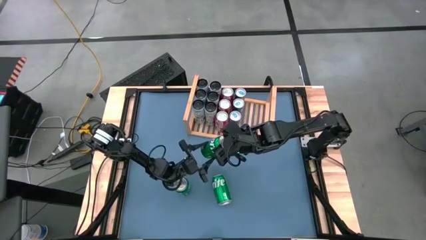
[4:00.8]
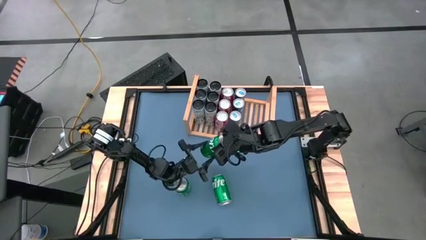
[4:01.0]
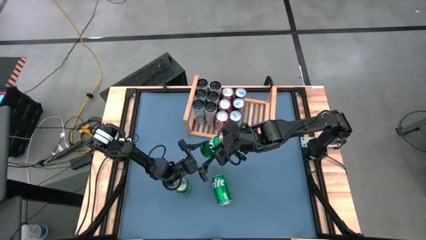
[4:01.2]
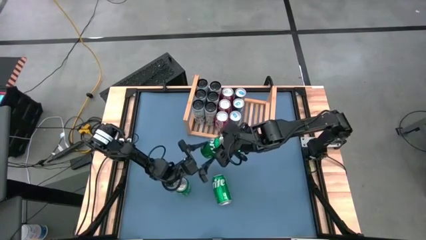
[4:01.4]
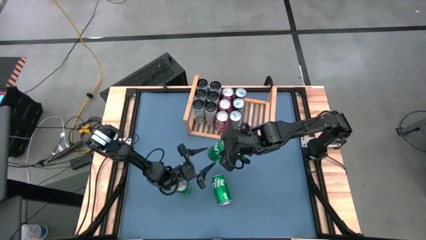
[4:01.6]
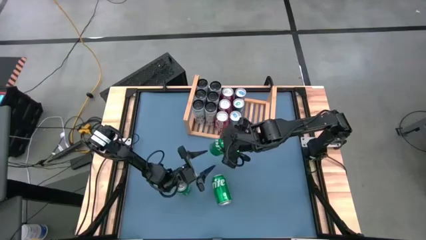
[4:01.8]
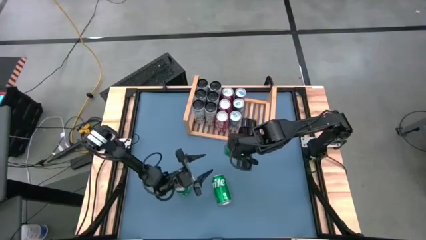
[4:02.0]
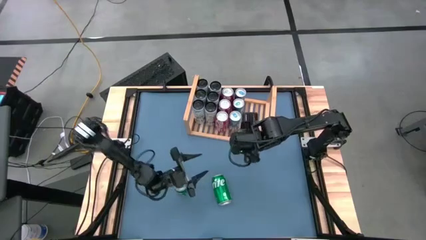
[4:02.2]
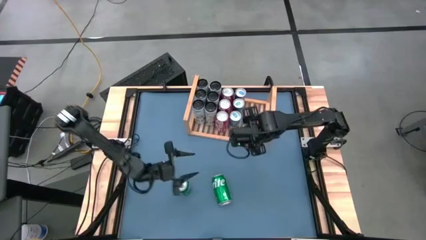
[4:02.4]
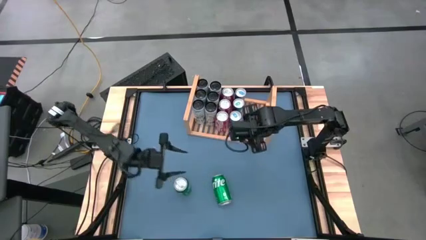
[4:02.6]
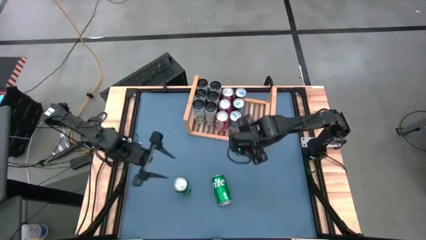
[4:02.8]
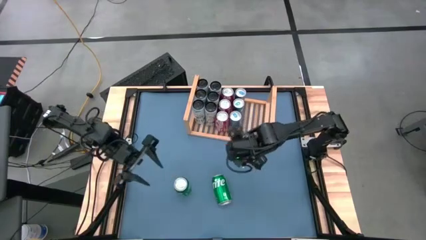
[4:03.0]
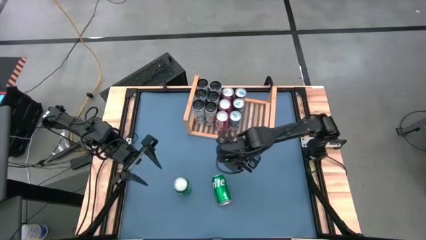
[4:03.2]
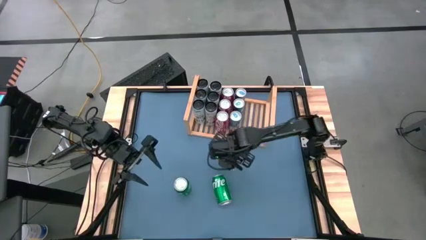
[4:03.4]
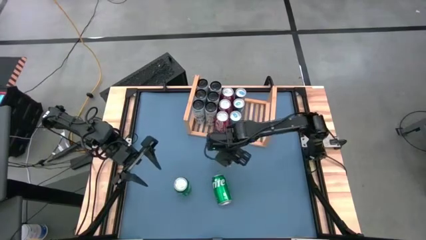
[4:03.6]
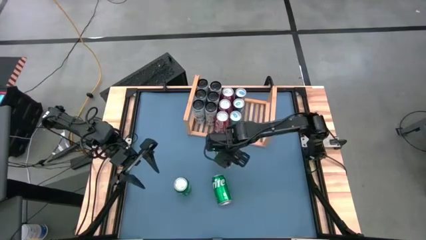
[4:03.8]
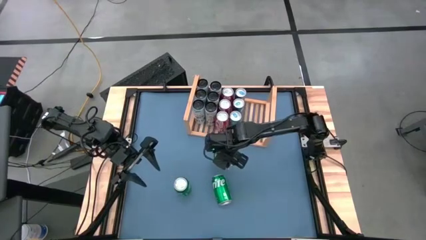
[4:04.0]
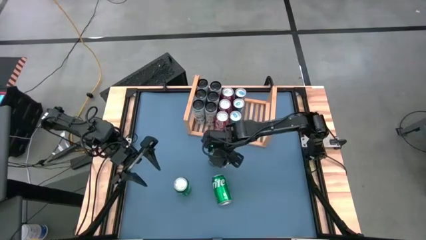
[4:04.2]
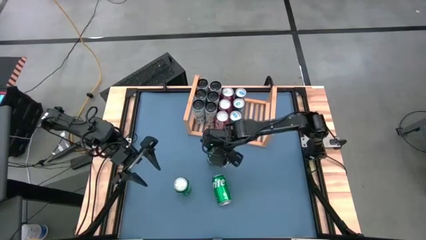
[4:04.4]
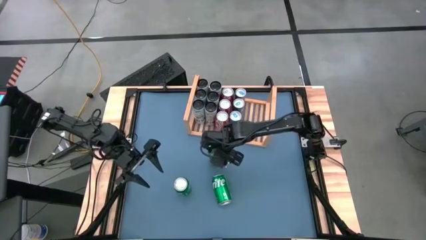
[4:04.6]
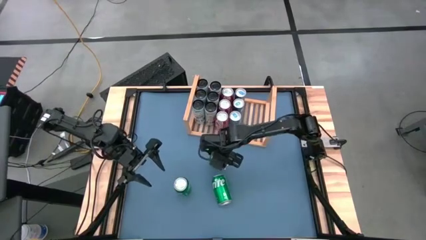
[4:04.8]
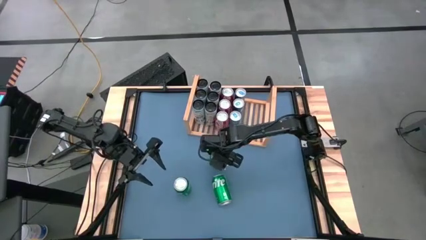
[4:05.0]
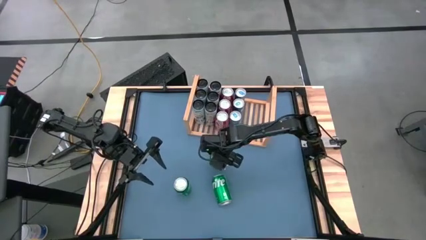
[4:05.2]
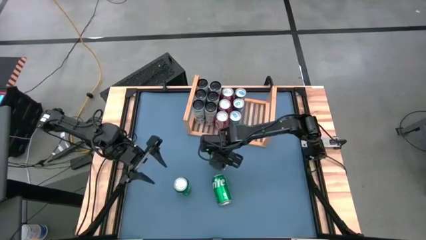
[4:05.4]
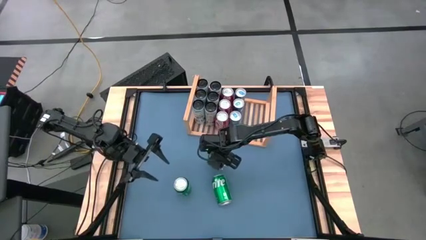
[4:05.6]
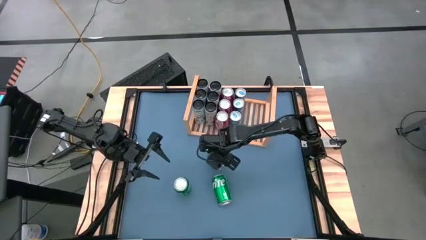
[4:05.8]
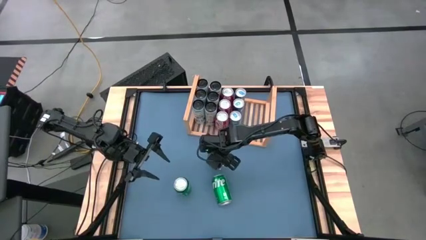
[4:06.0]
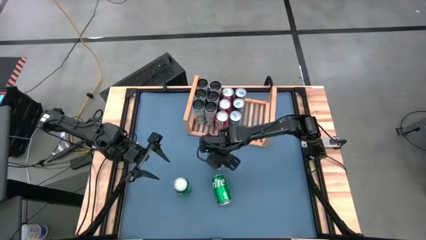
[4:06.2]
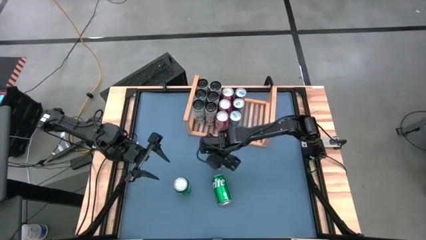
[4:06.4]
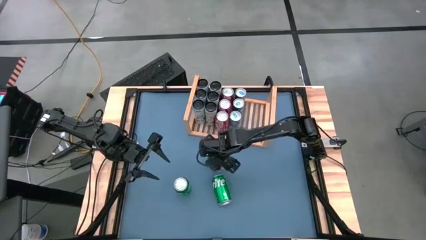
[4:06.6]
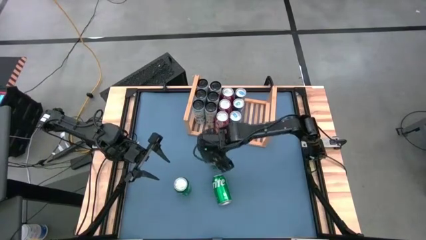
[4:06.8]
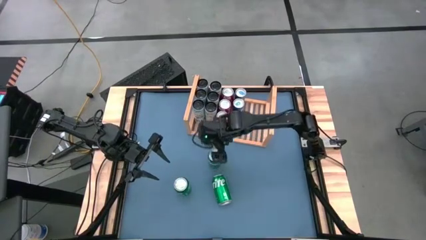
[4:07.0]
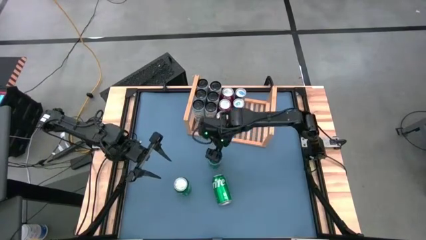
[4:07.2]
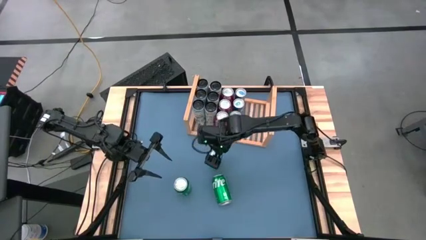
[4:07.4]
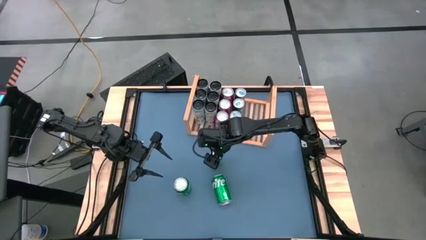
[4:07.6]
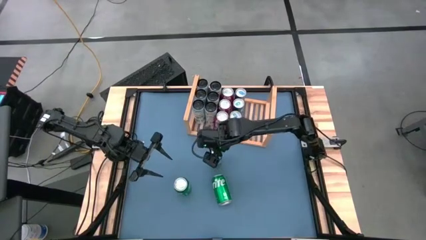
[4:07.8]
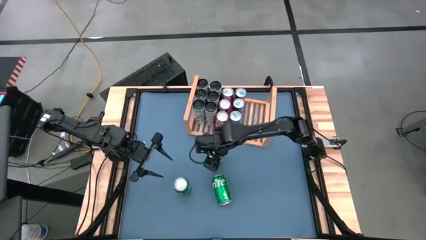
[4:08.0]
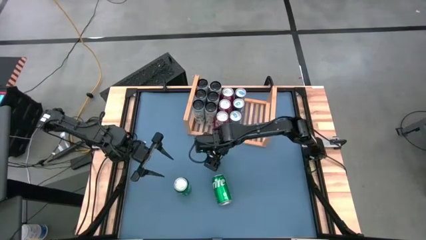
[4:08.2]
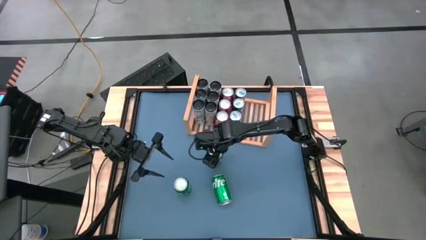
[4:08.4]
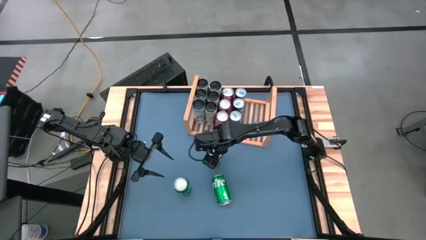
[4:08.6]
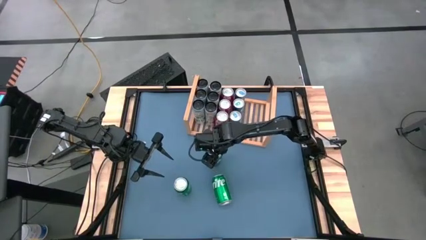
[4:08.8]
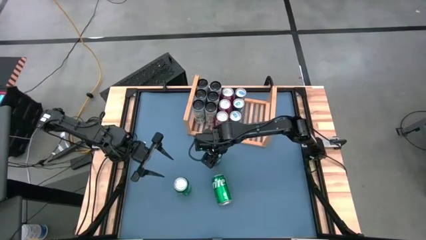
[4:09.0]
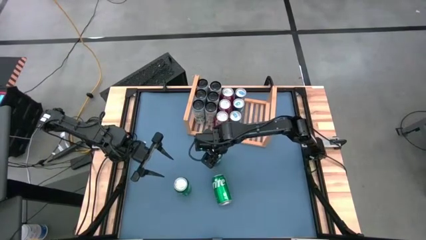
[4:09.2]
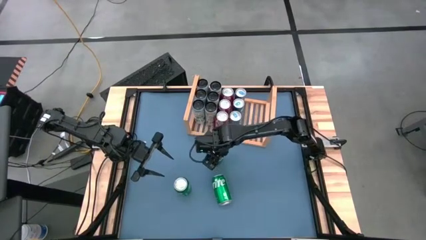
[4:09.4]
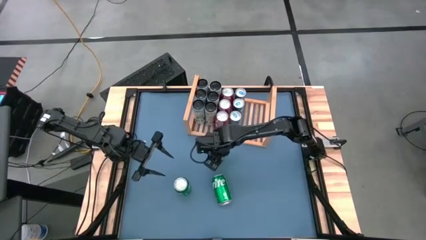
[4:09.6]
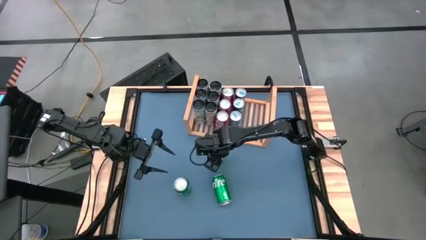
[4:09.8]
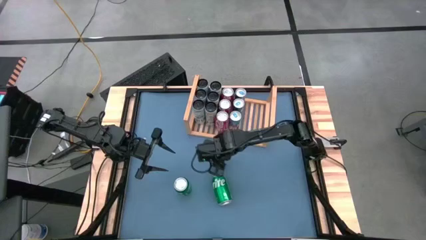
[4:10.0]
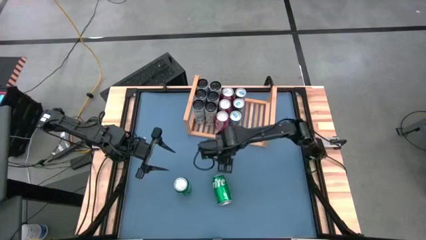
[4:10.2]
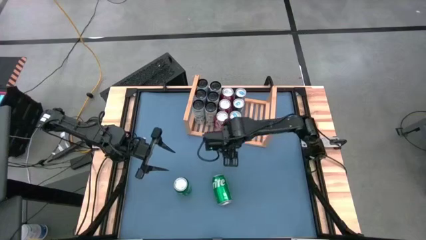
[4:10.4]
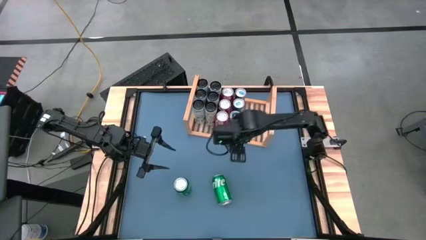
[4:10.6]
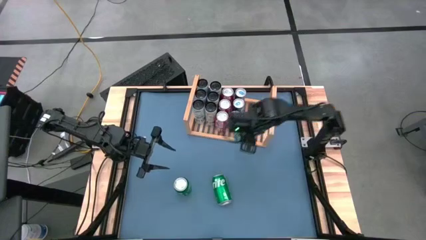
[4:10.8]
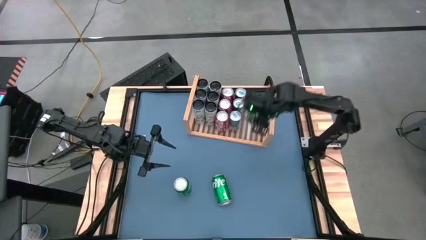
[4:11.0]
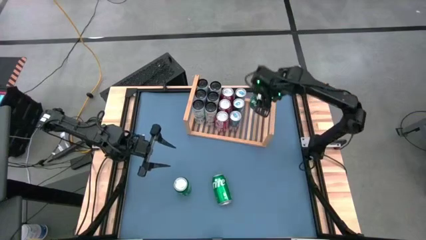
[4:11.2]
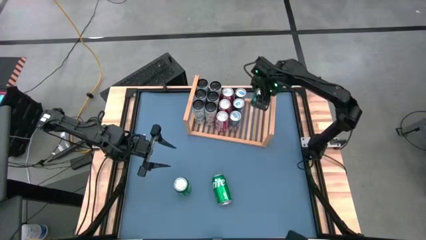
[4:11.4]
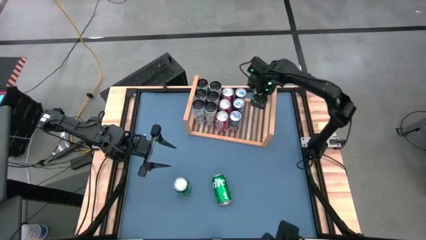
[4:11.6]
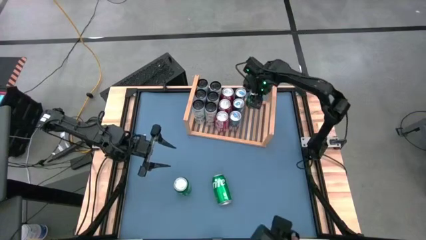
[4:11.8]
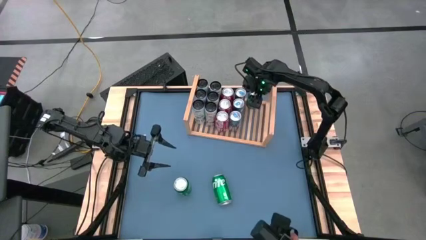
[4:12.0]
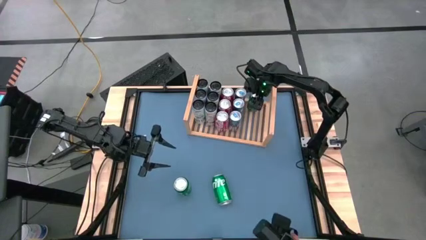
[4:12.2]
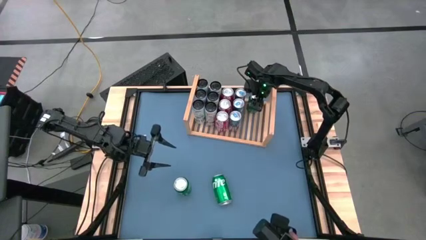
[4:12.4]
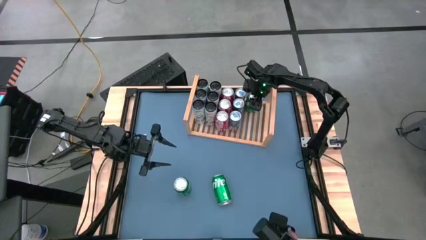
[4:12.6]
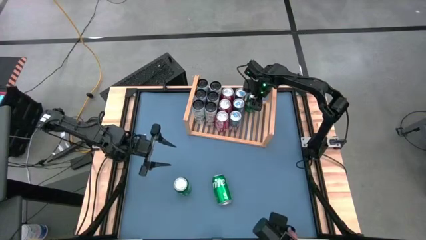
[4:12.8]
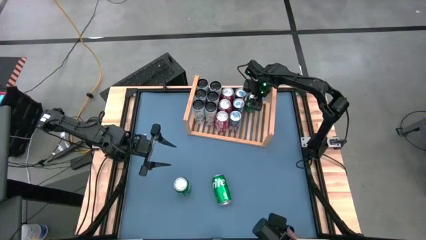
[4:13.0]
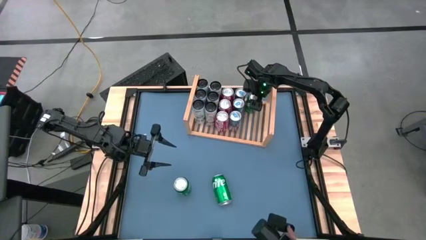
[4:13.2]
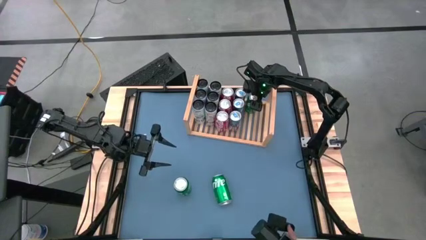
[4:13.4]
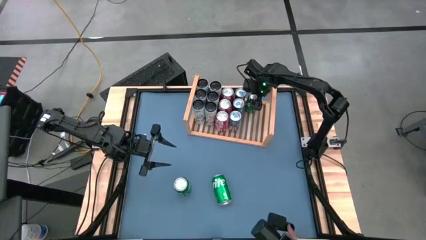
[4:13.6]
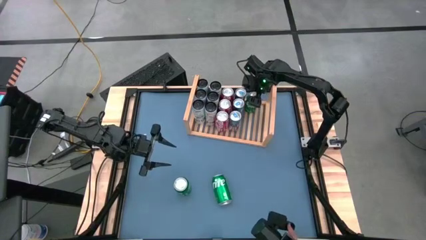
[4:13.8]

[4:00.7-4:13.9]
Task: Place canned beverage on shelf
Put the green soda can on the shelf

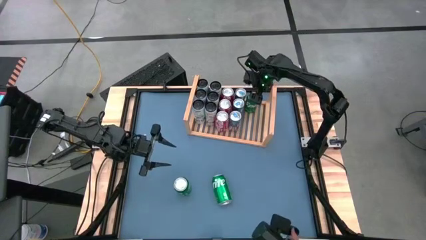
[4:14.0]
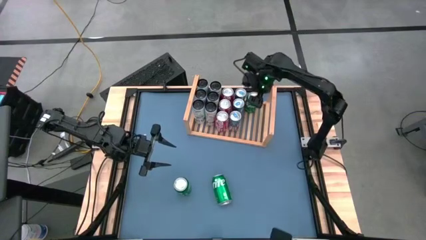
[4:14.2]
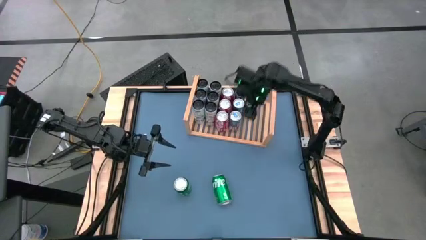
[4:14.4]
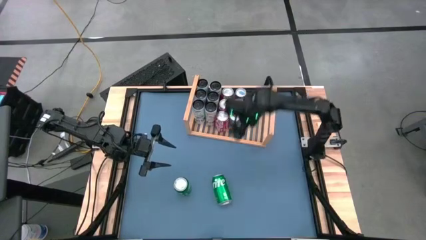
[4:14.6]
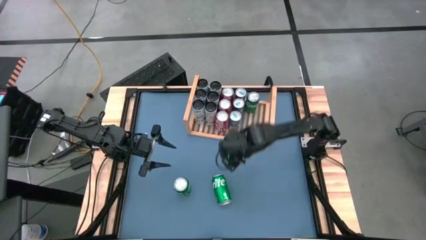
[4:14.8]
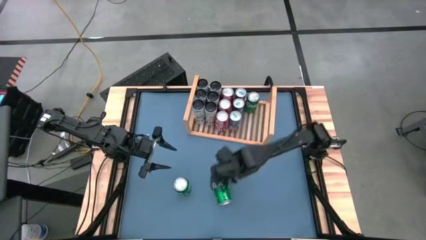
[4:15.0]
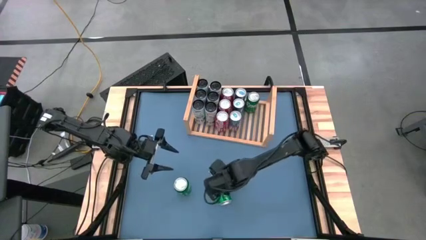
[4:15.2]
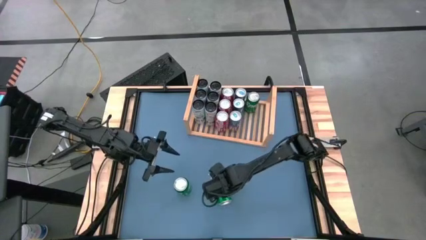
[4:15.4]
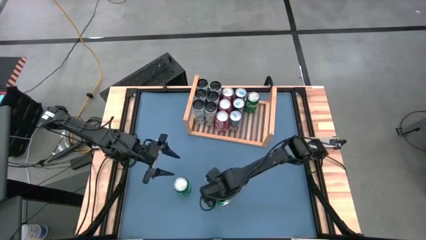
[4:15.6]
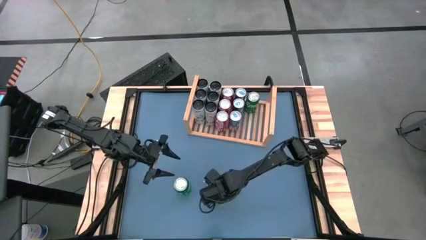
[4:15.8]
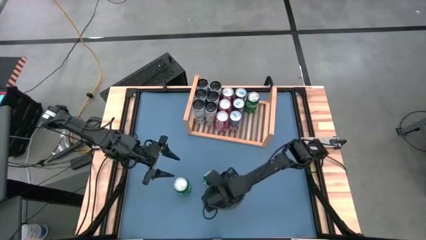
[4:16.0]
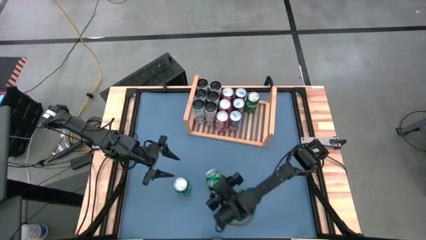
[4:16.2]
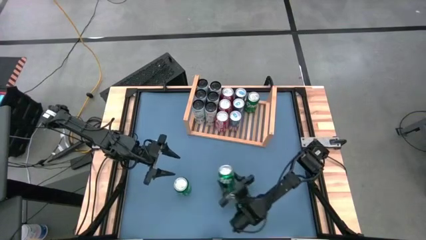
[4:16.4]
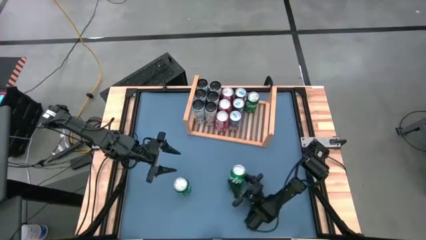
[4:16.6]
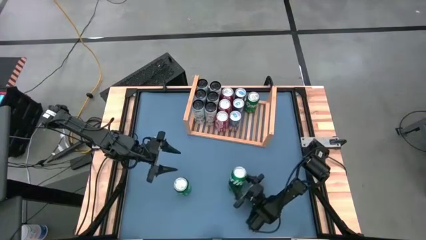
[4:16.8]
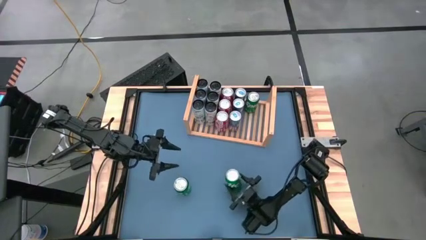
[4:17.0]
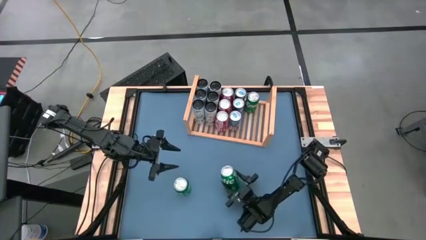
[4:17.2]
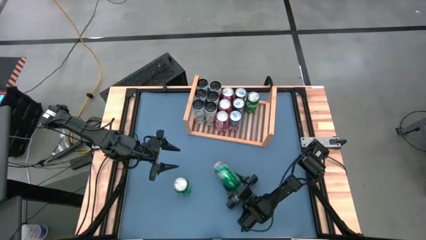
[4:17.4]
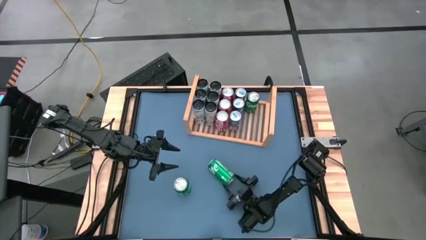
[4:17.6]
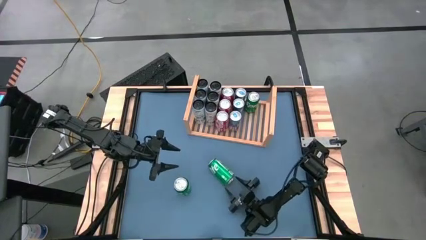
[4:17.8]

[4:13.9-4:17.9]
Put the green soda can on the shelf aligned with the other green soda can

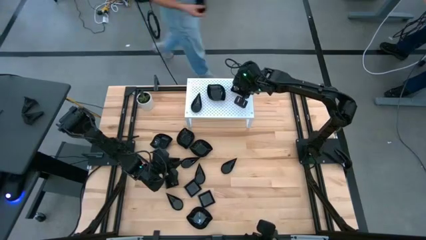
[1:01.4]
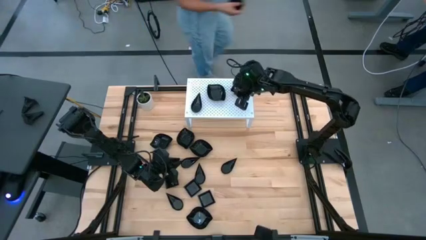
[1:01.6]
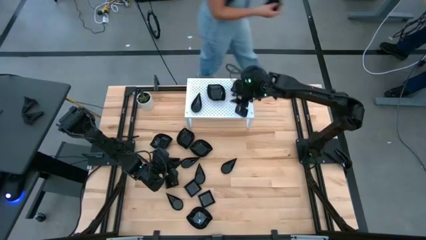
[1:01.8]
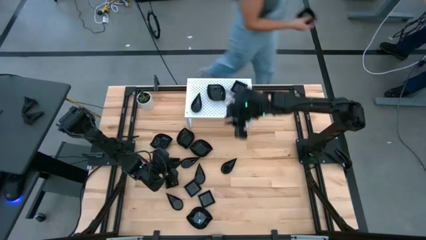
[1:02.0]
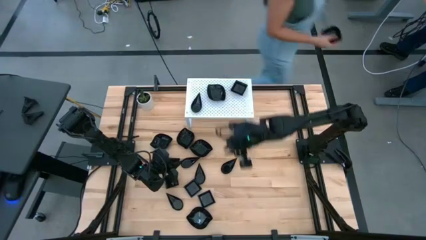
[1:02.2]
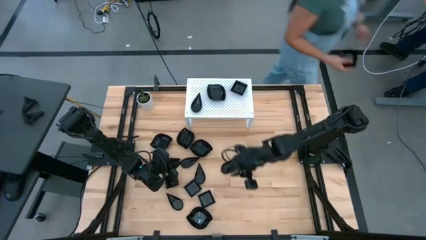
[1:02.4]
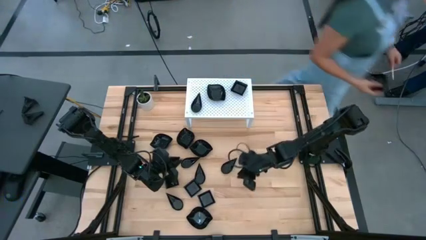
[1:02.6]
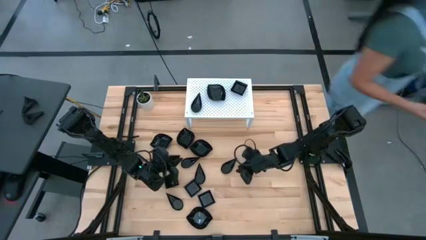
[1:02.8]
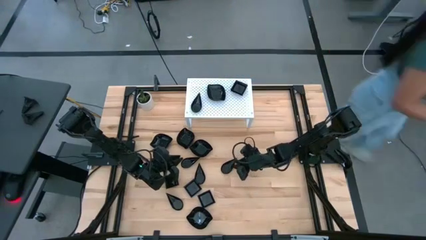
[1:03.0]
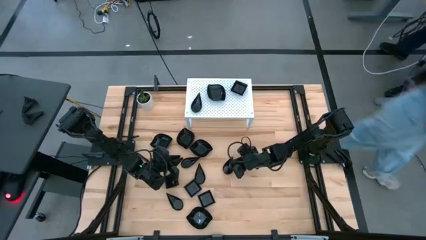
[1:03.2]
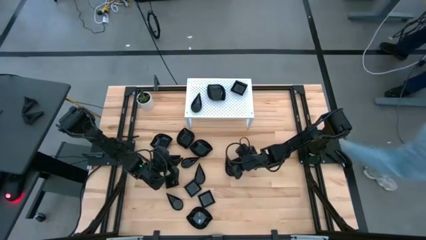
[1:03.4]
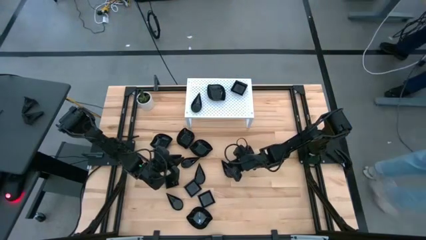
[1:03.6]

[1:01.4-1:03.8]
Task: Pick & Place Mini shaped plates
Stack the black drop-shaped plate on top of the other black drop-shaped plate on the shelf
